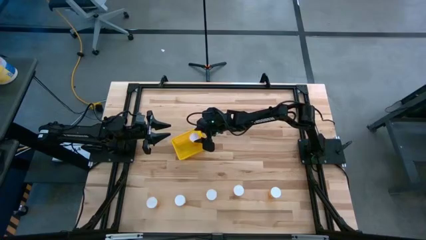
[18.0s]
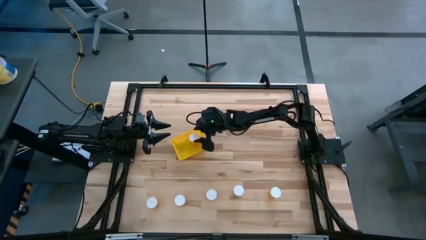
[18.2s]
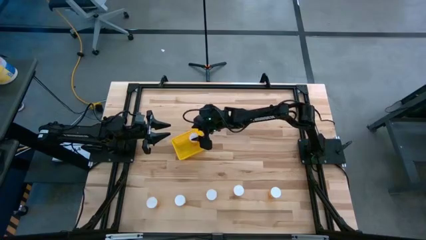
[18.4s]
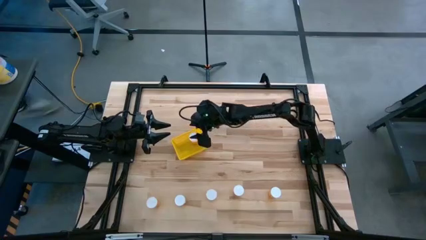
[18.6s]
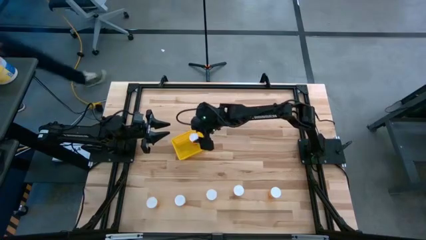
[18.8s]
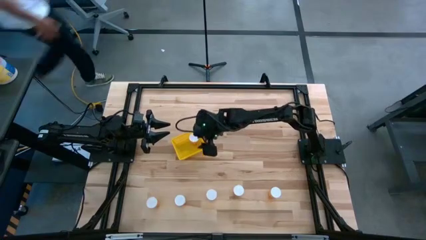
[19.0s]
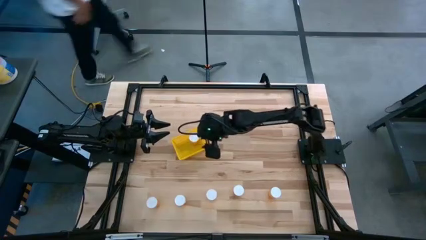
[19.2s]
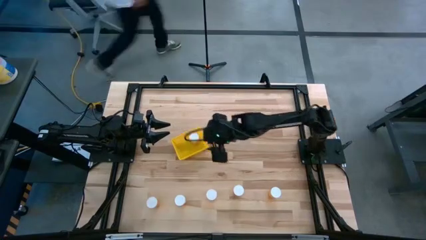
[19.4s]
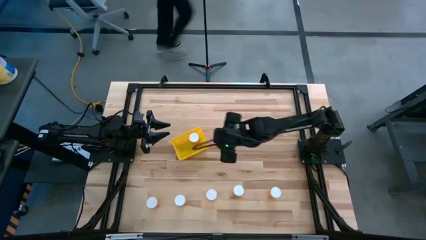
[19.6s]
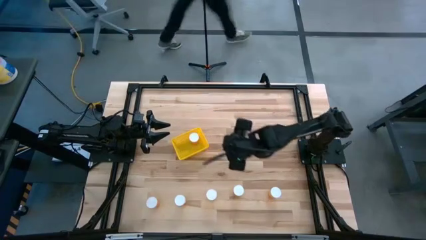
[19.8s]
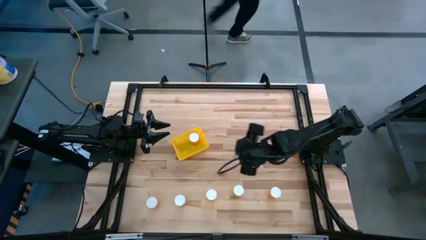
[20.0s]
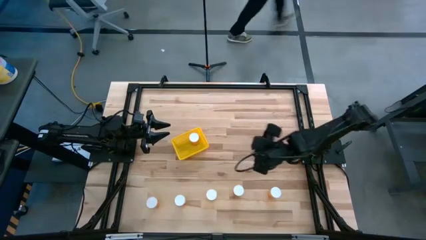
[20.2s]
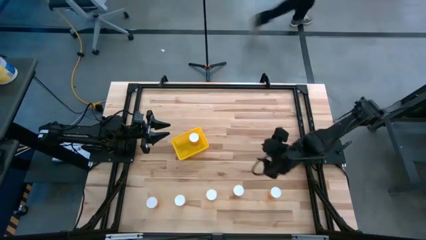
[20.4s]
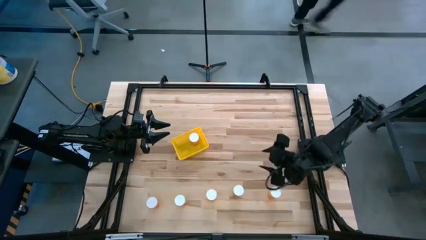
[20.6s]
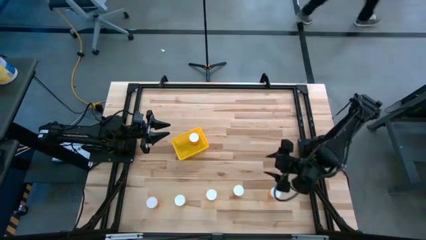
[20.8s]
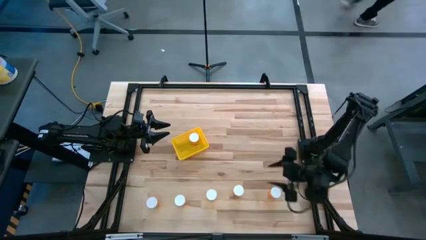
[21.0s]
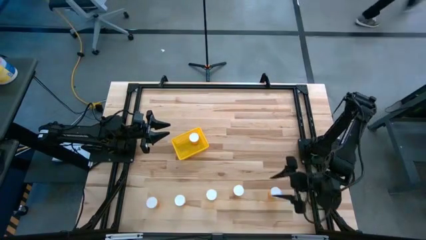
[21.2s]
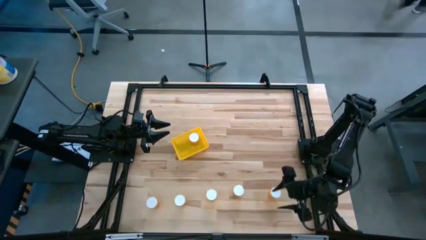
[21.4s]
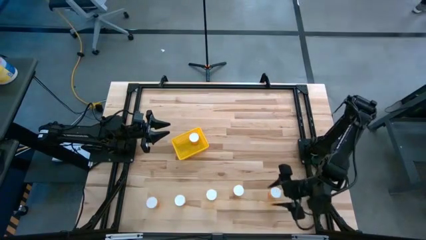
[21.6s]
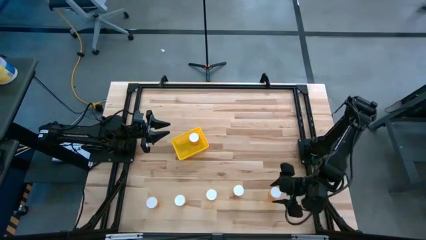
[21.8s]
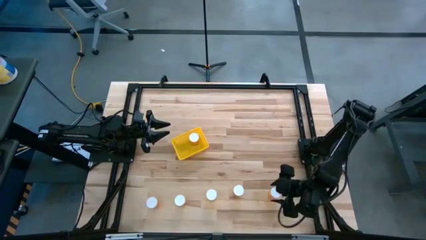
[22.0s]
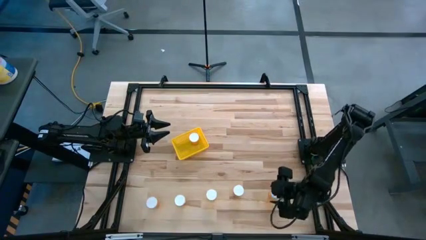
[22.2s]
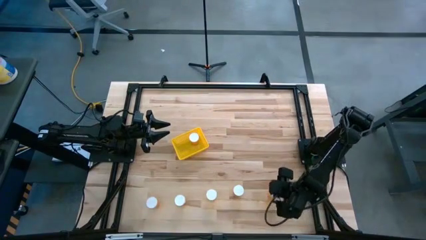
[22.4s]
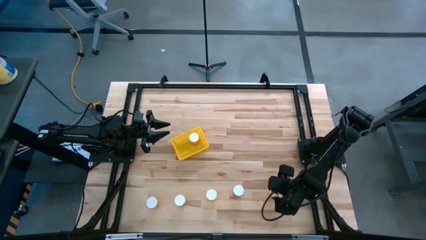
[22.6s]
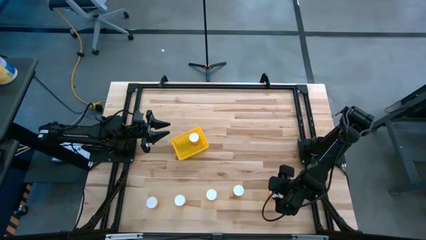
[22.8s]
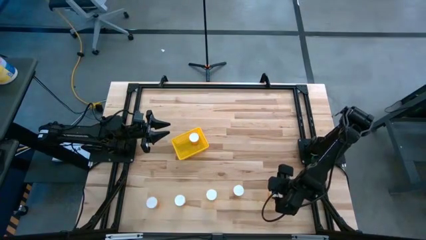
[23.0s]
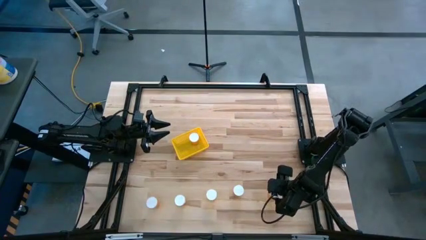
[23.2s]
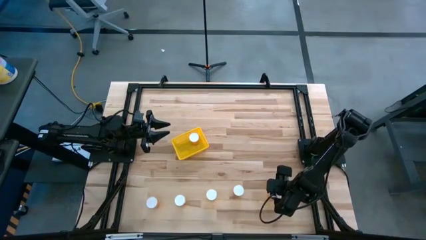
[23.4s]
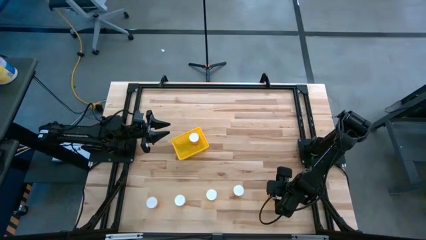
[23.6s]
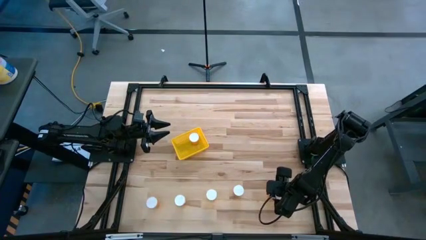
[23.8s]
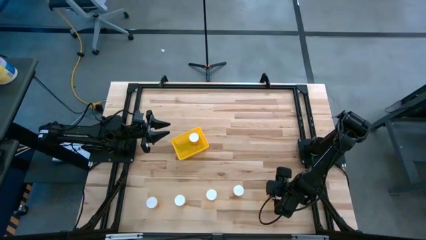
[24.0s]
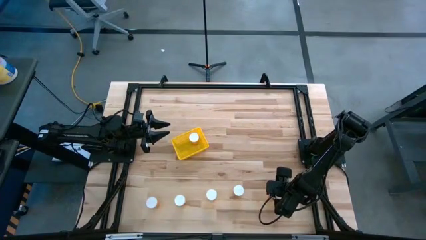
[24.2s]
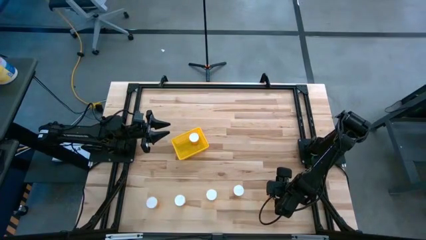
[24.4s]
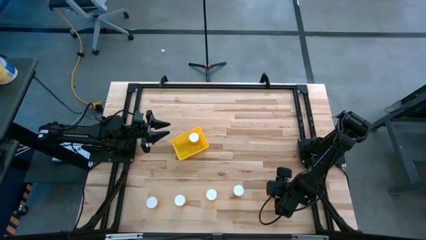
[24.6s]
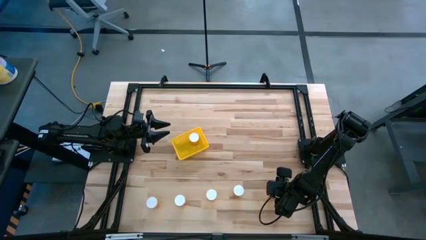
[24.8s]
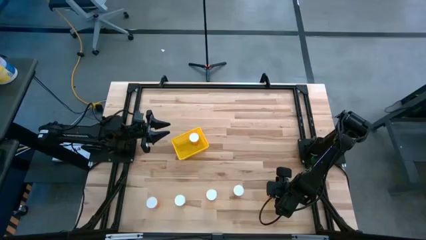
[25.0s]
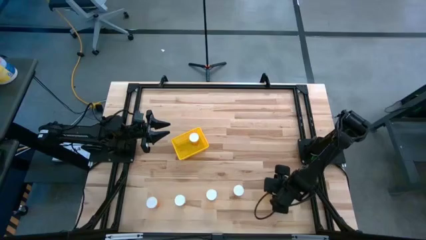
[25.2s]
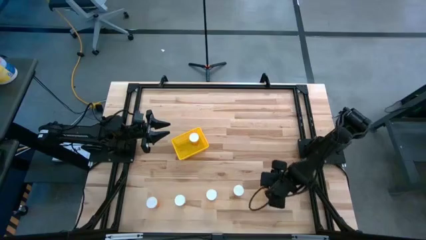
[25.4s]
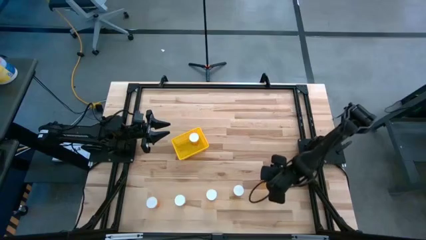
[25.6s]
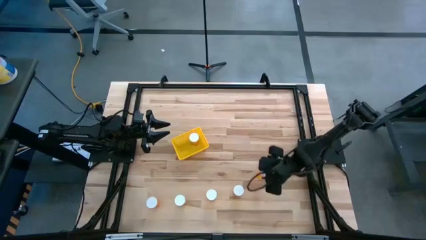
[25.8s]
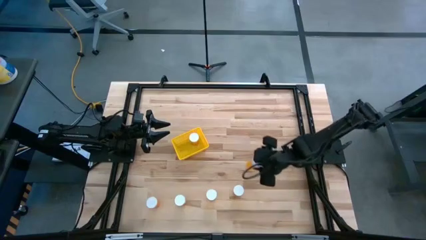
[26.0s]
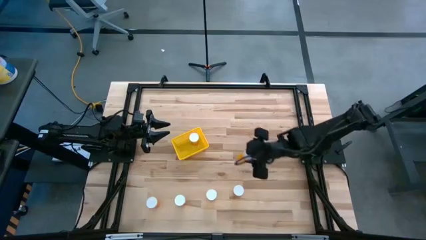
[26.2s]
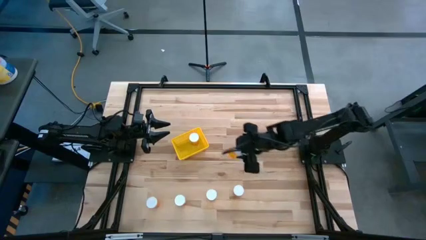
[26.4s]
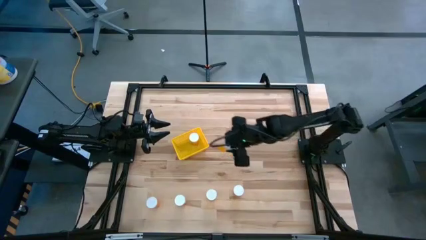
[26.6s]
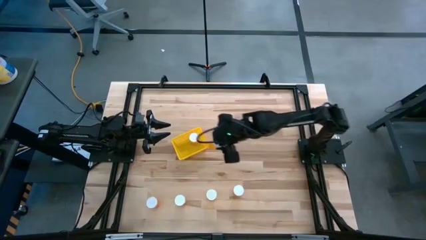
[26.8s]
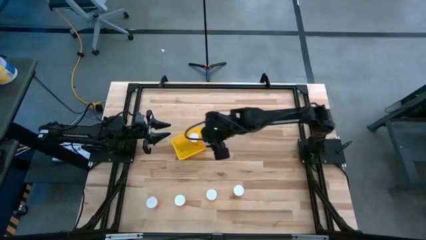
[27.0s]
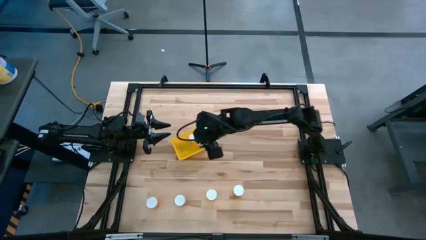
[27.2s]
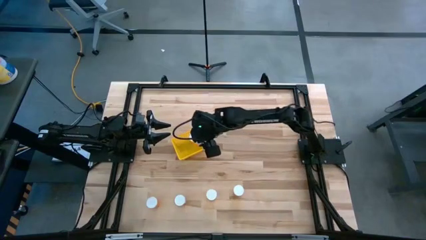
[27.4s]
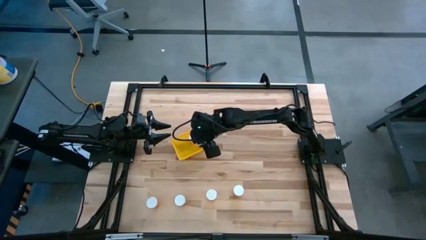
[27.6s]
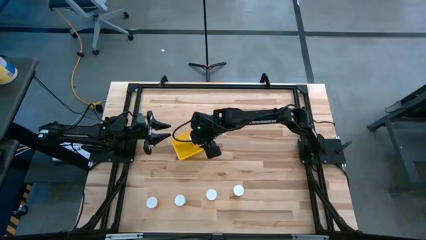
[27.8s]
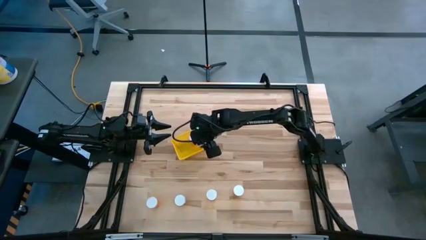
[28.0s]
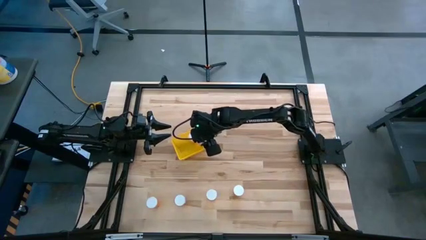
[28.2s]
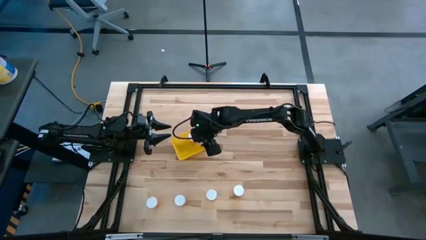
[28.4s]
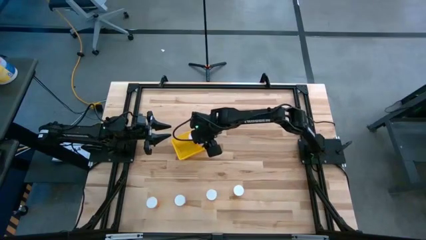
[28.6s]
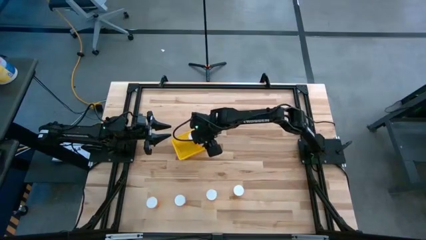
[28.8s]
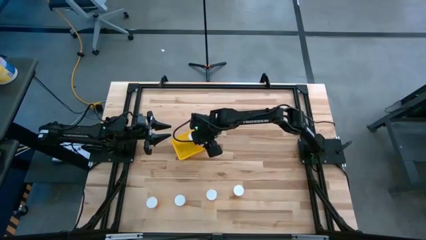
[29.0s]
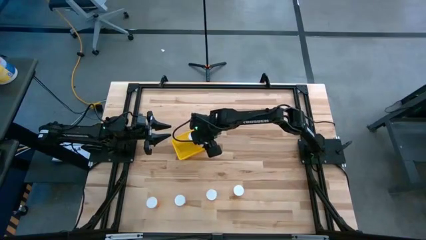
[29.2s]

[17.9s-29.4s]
Task: Pick and place pill bottles into a basket
Put the orange pill bottle into the yellow basket
